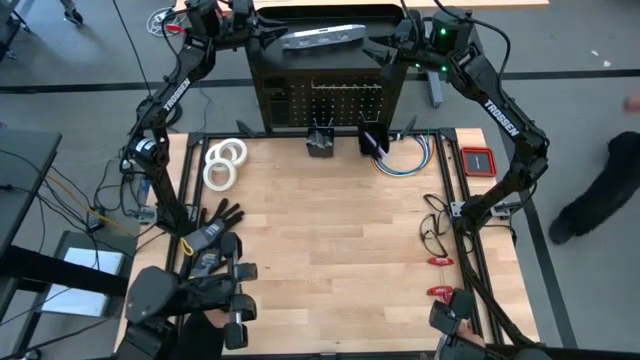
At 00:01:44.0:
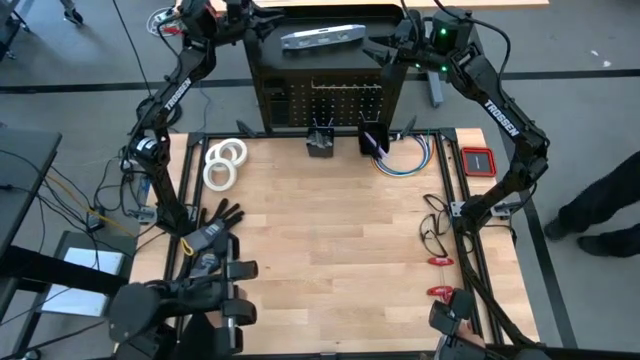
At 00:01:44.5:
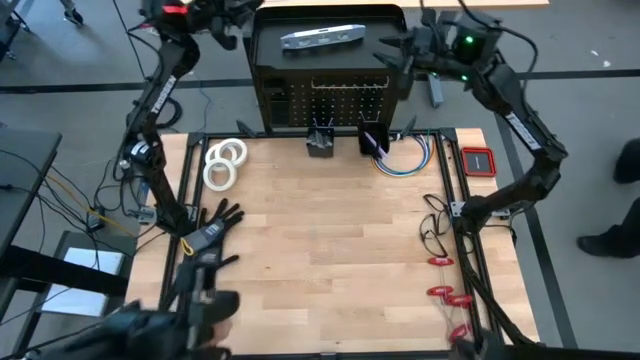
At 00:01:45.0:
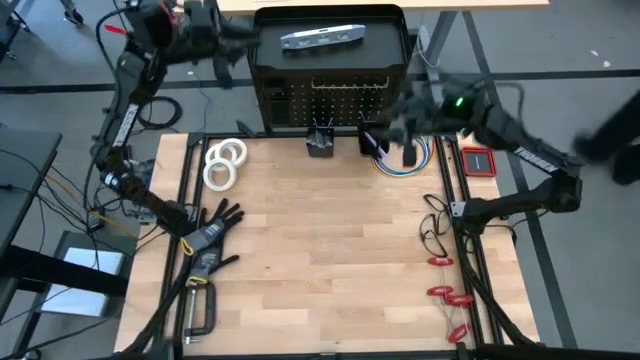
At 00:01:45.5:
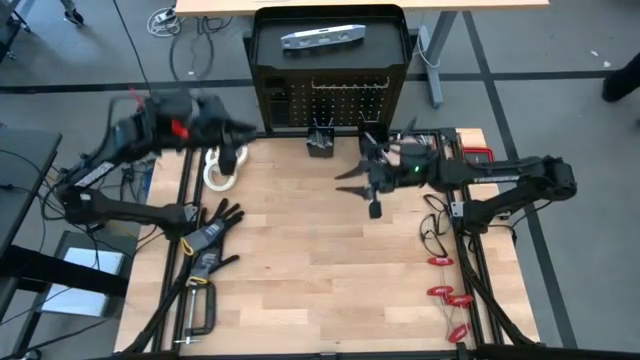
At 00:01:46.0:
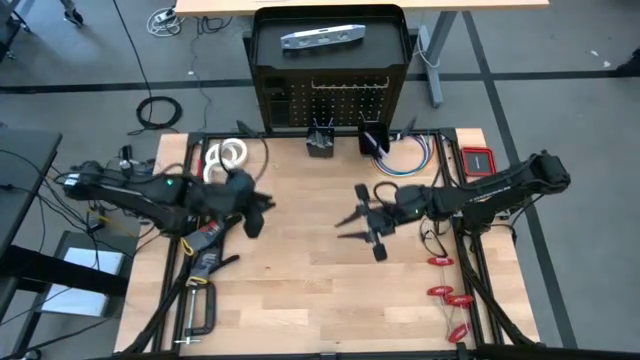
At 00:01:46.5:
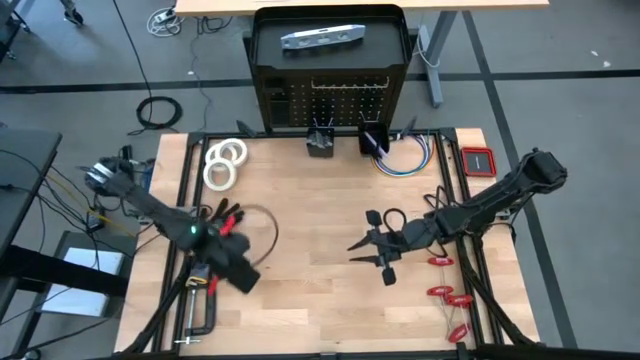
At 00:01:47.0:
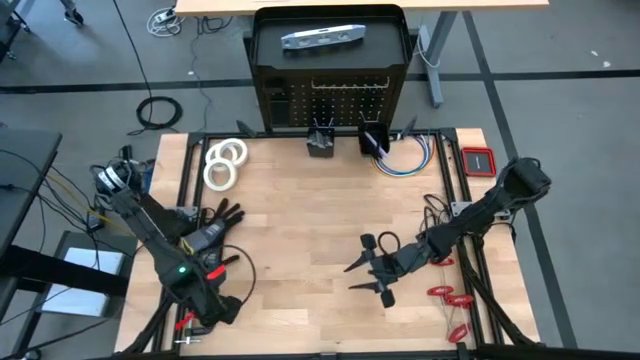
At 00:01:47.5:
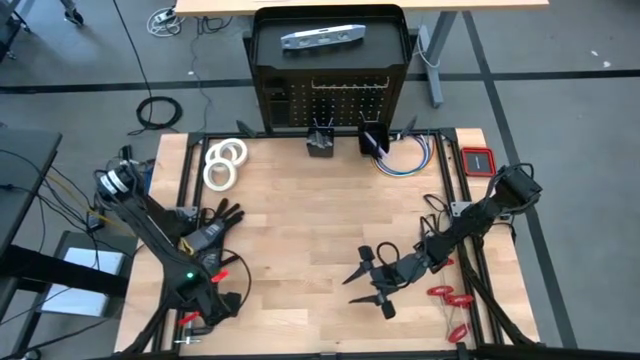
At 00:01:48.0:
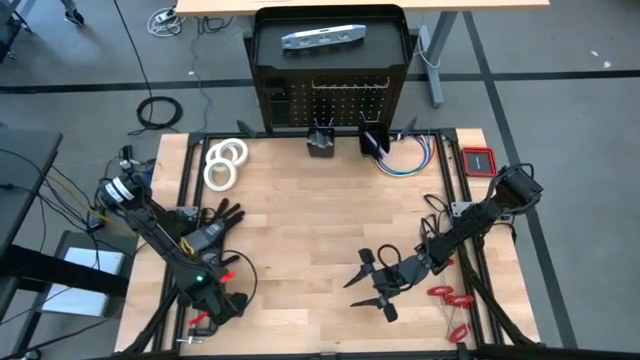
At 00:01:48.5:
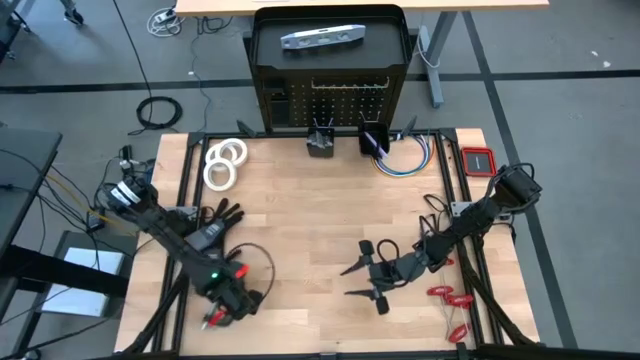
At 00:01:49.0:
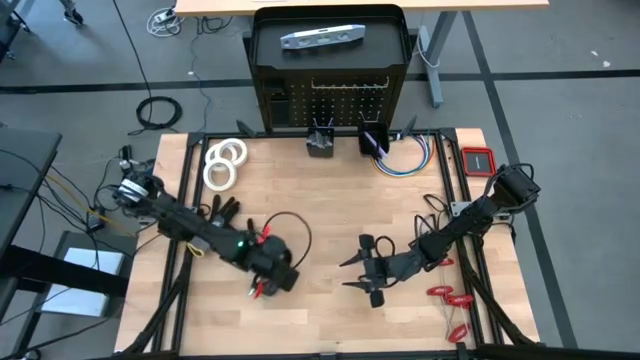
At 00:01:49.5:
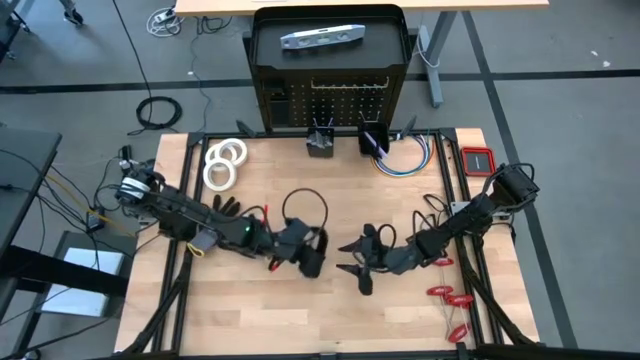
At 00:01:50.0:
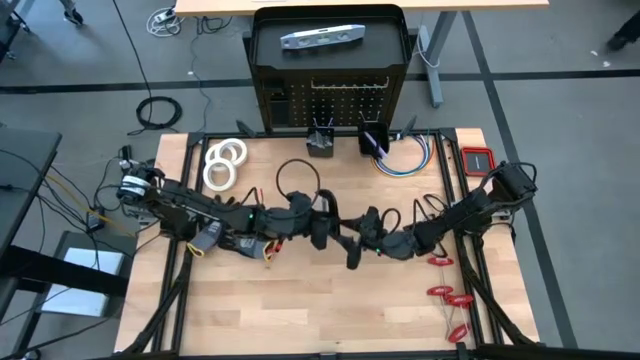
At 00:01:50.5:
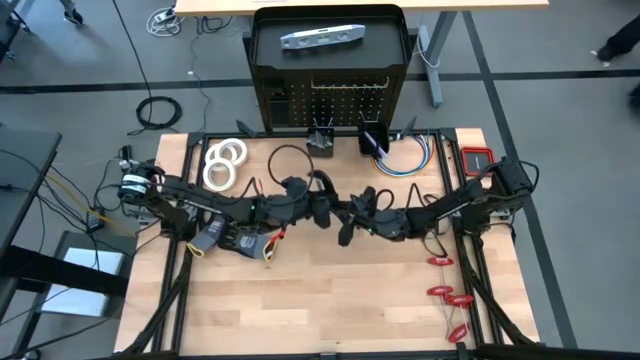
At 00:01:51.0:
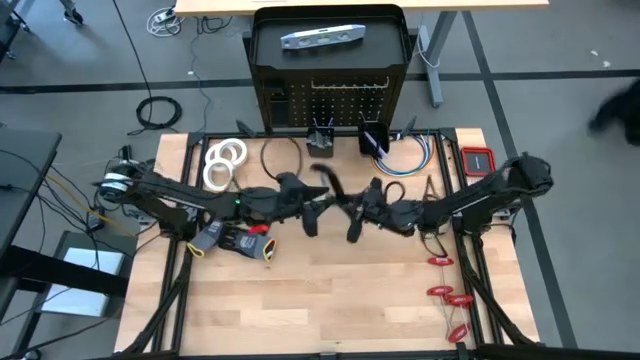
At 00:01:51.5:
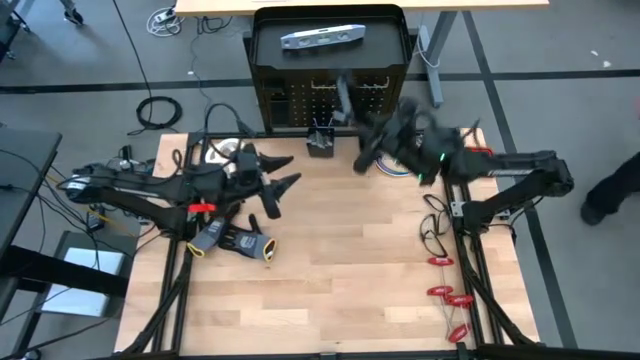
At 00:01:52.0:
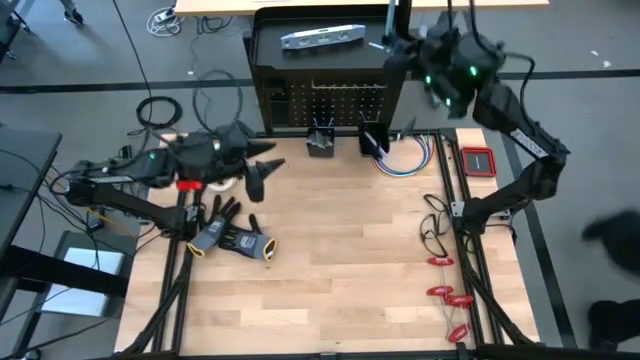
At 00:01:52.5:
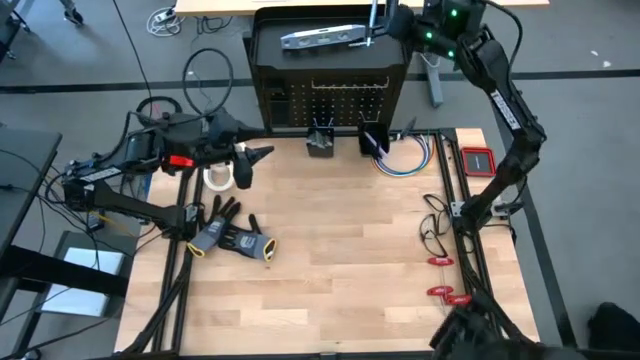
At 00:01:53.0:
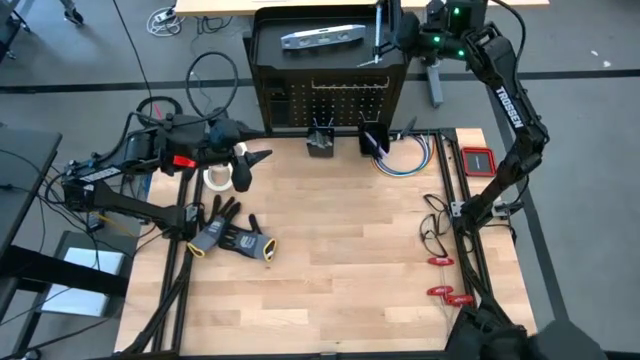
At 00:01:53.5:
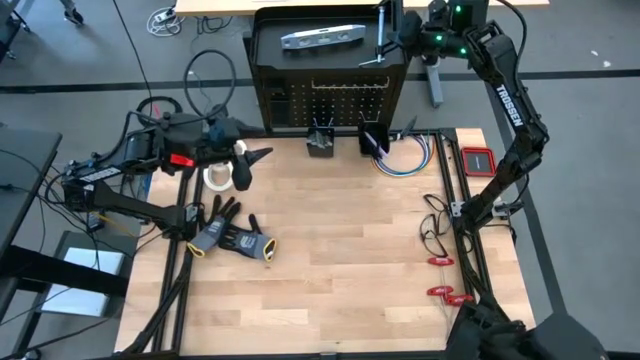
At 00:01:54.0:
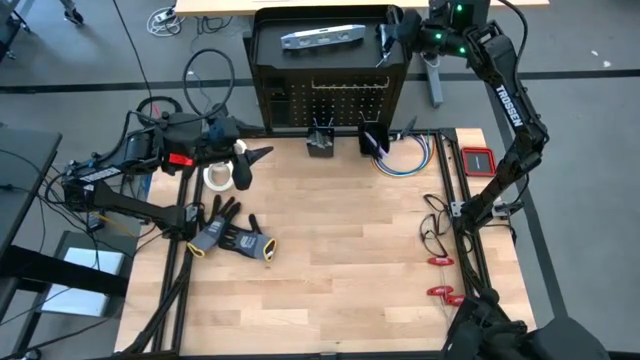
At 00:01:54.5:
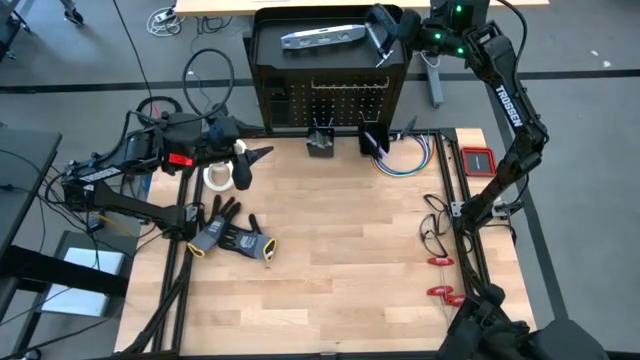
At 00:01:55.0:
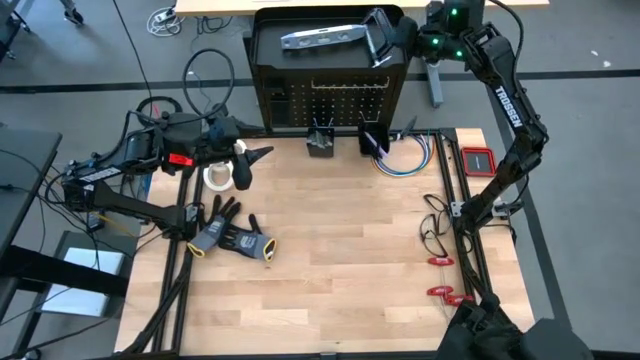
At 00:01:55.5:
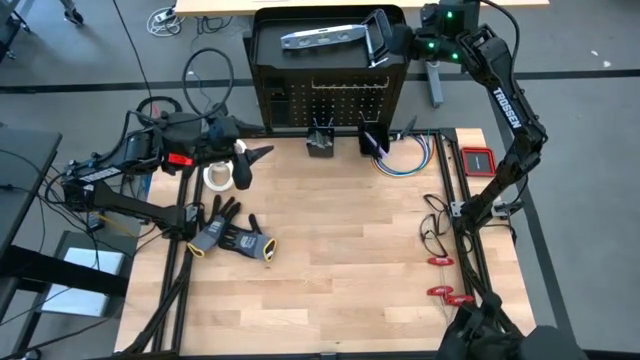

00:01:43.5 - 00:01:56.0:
Task: Hang tools onto peg board
Put the black clamp on the peg board

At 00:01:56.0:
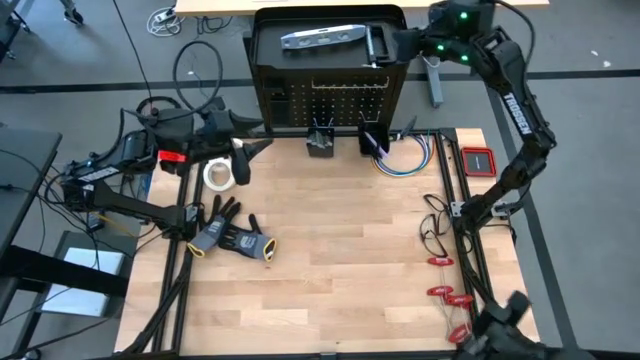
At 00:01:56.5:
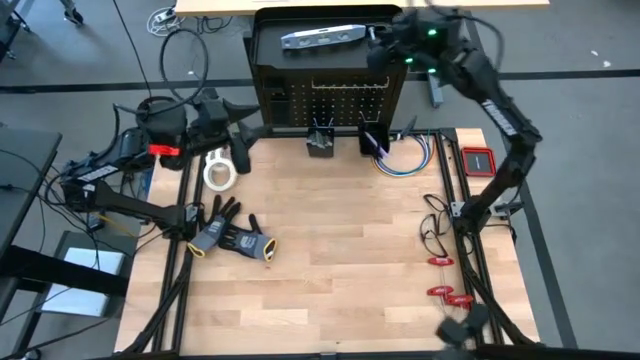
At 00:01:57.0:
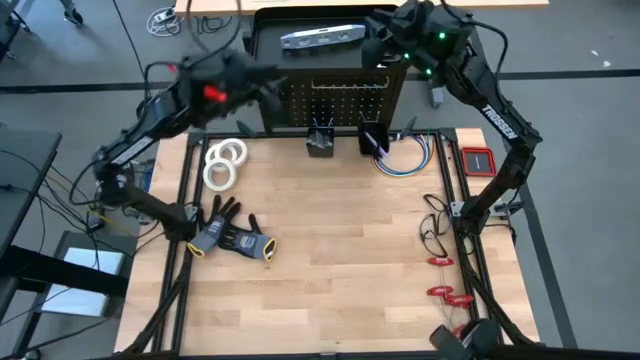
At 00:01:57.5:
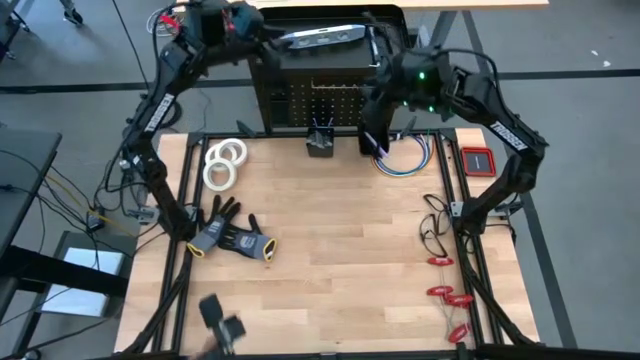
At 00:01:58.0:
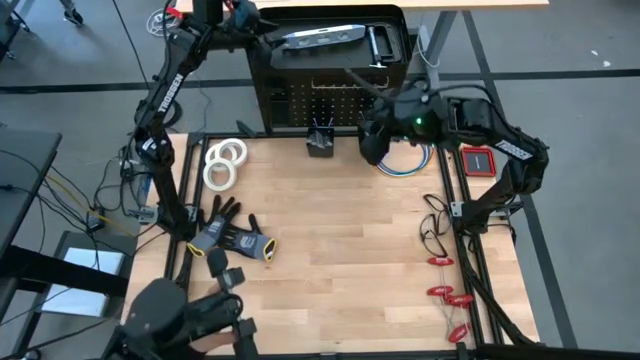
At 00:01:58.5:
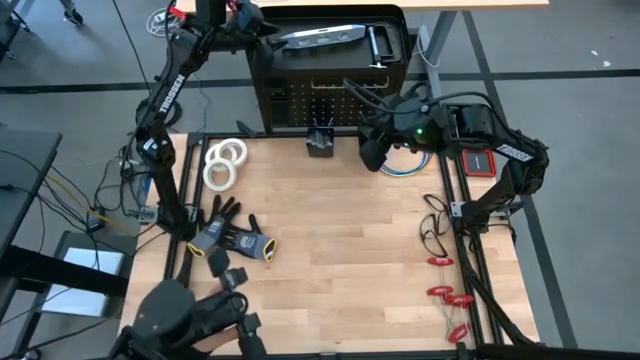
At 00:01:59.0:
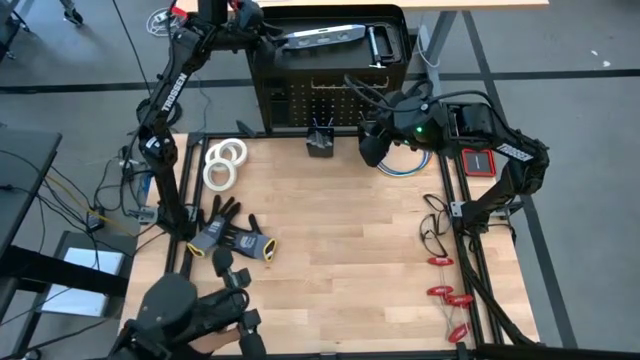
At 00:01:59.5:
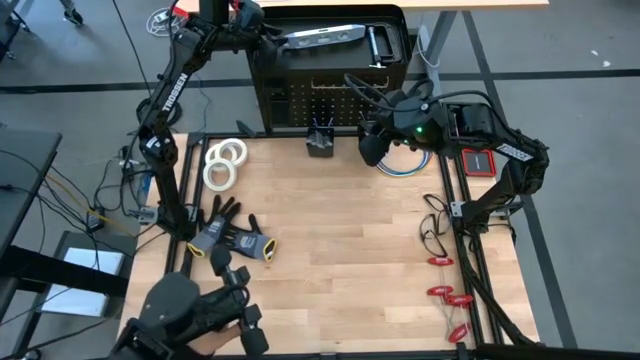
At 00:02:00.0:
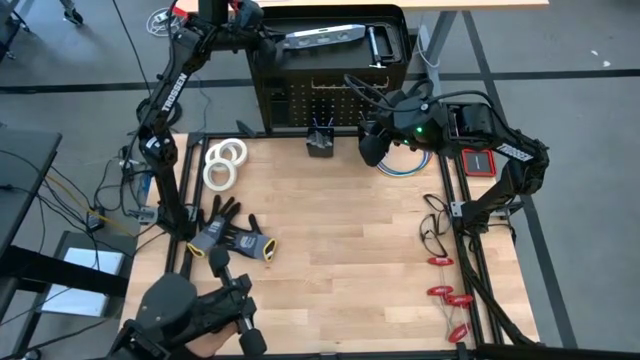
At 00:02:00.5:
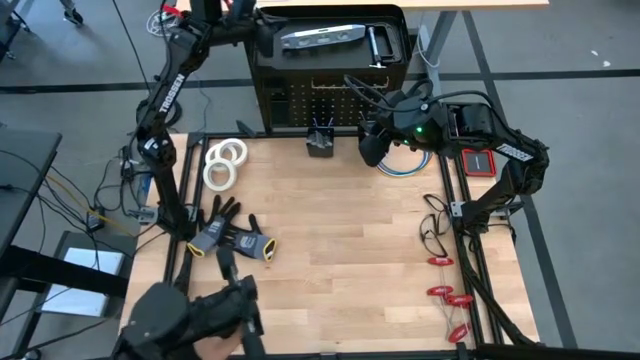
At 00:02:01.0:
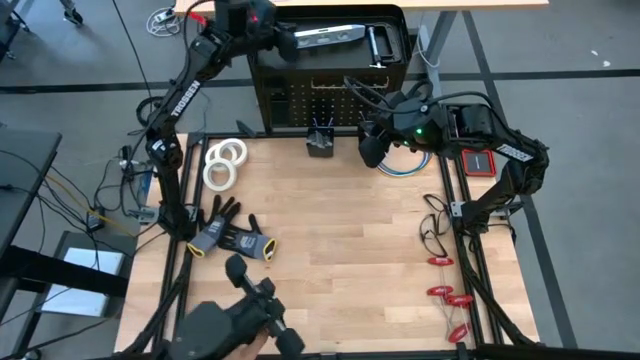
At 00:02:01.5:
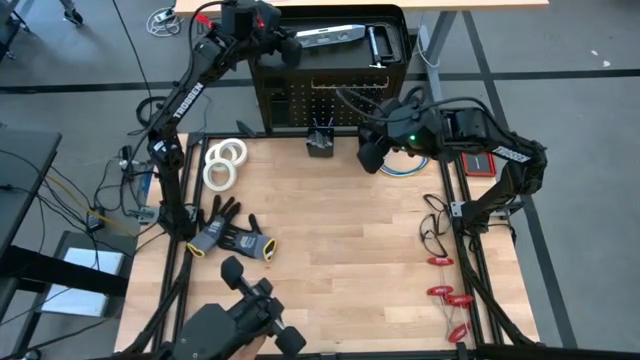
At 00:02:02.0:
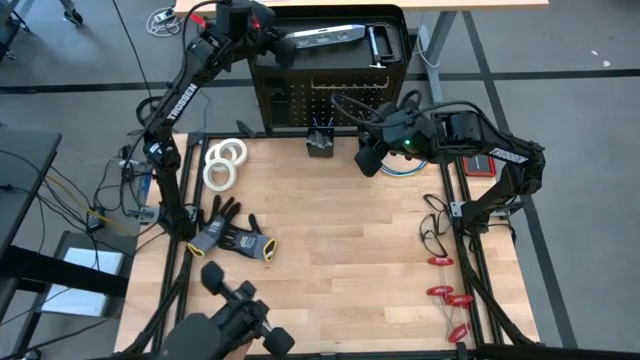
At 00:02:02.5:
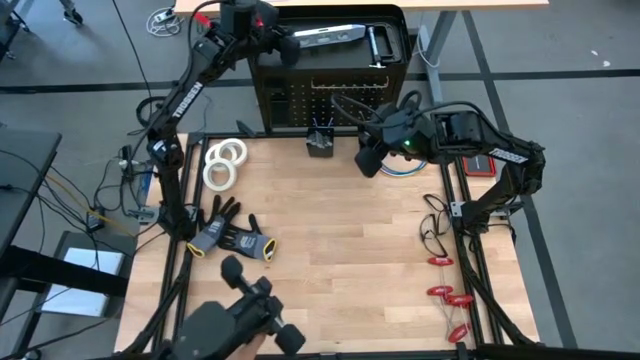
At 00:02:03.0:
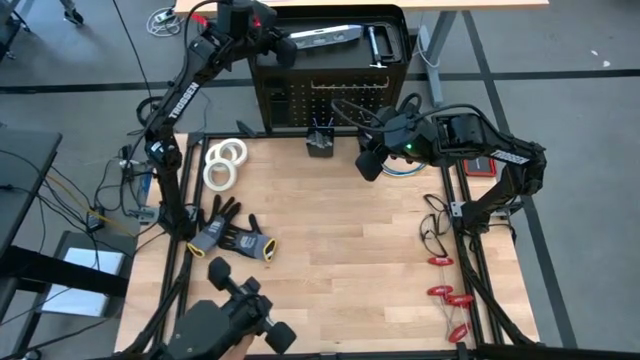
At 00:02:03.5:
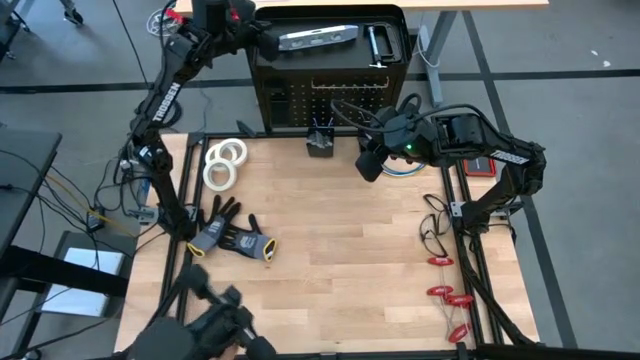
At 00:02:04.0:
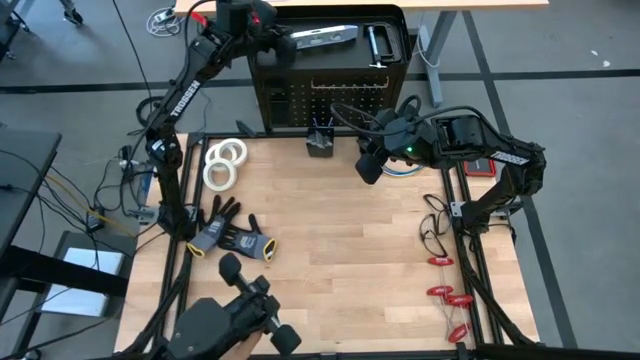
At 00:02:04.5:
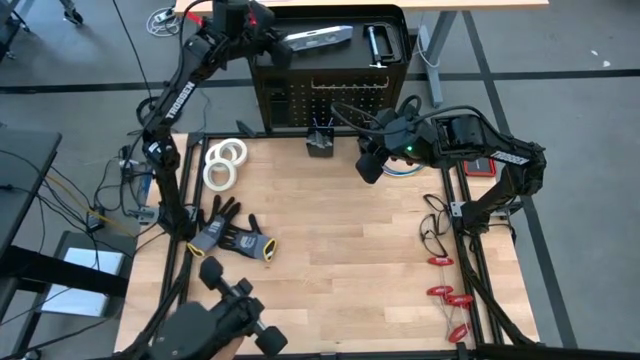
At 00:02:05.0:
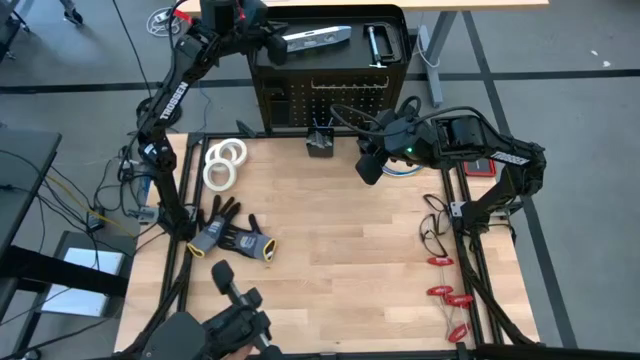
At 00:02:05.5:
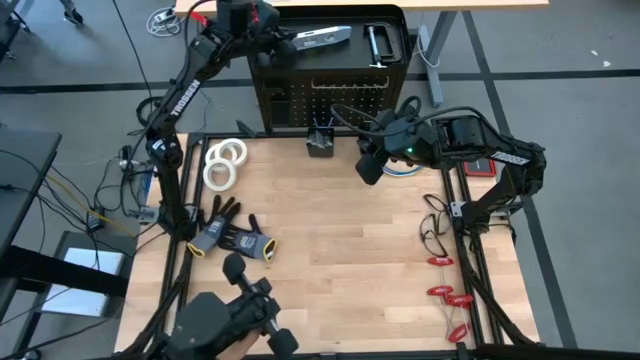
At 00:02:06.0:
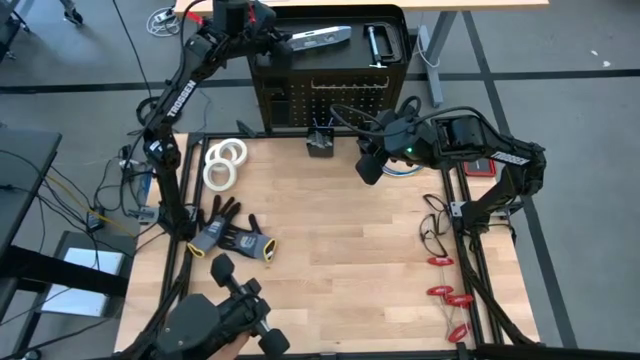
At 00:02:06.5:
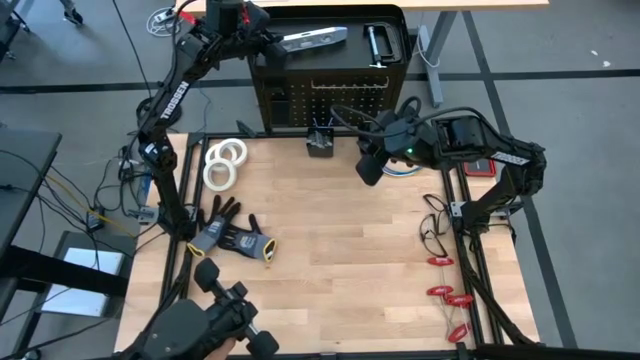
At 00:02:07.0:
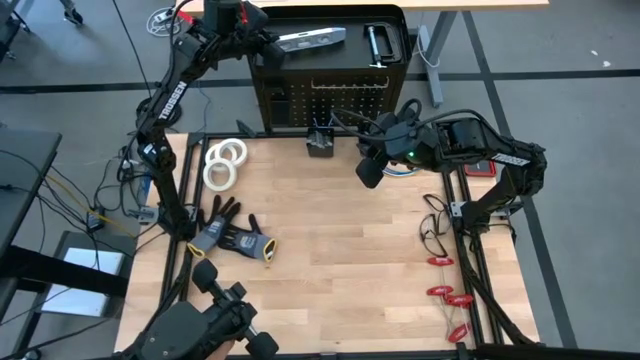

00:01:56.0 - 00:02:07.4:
Adjust the spirit level on the peg board
